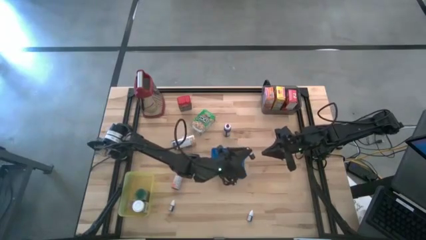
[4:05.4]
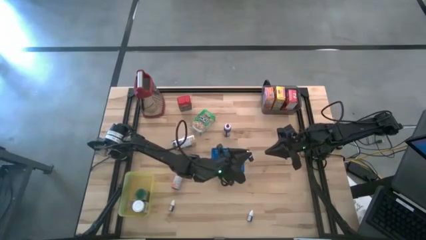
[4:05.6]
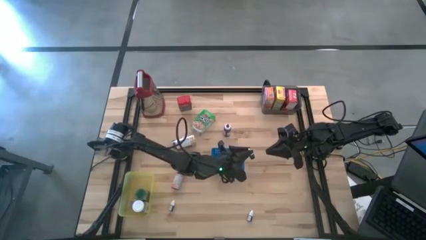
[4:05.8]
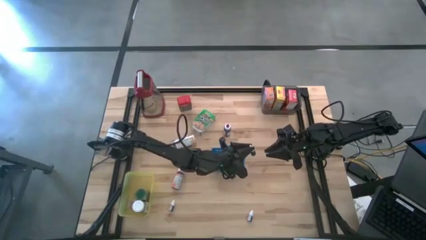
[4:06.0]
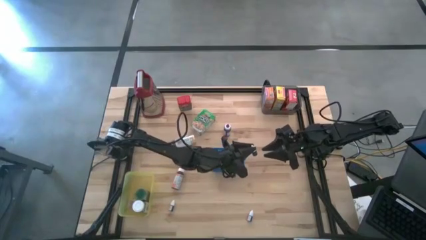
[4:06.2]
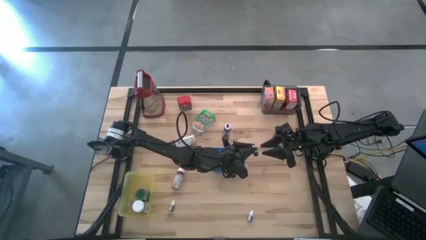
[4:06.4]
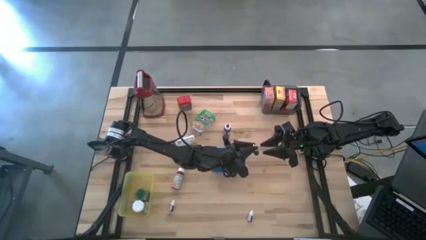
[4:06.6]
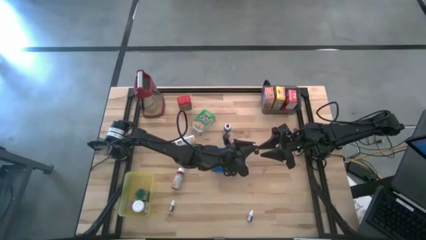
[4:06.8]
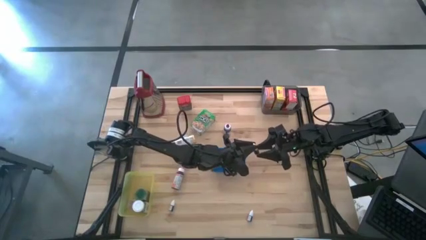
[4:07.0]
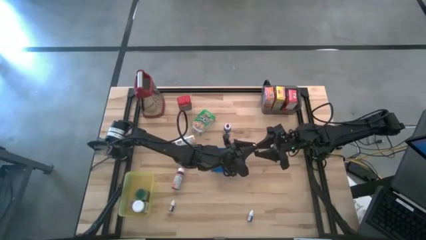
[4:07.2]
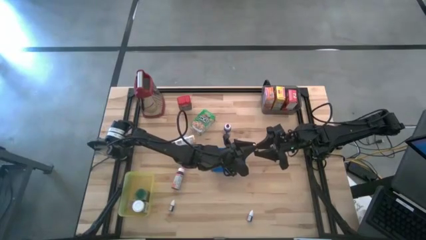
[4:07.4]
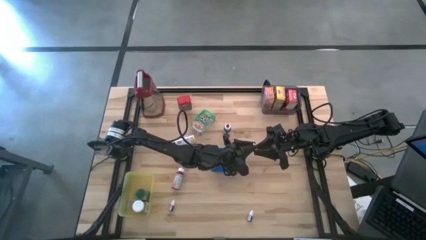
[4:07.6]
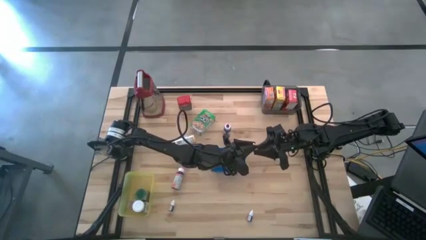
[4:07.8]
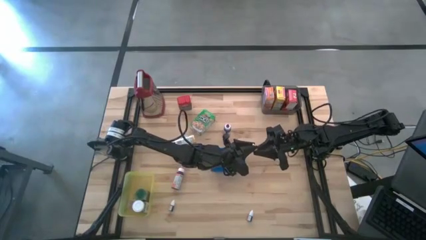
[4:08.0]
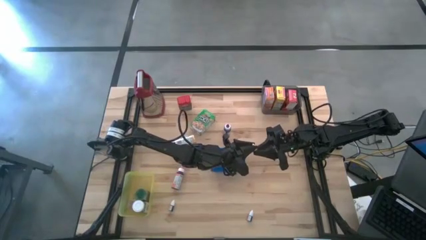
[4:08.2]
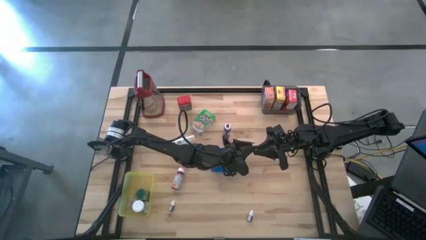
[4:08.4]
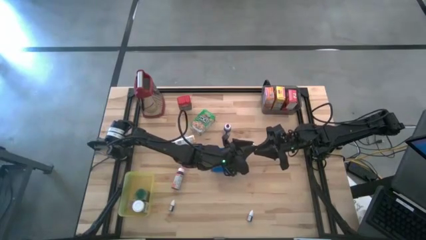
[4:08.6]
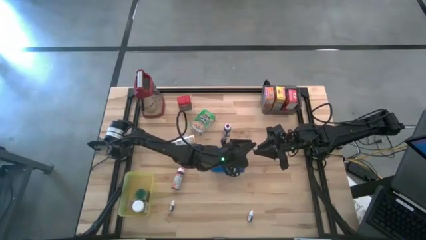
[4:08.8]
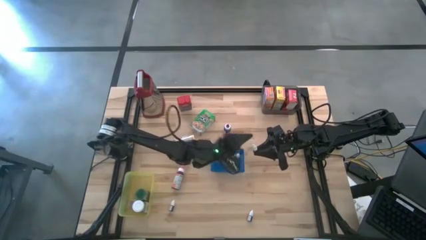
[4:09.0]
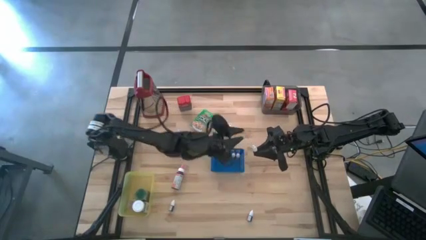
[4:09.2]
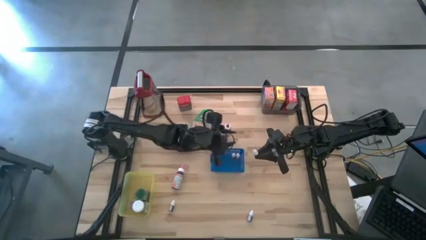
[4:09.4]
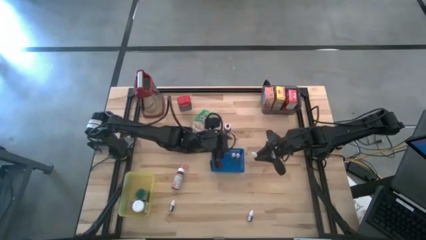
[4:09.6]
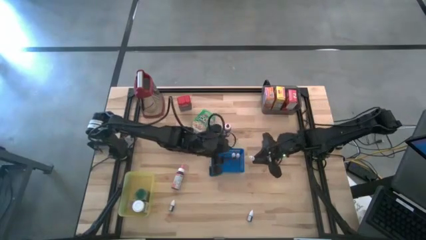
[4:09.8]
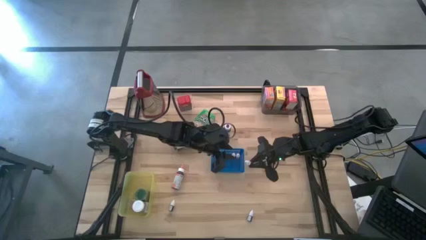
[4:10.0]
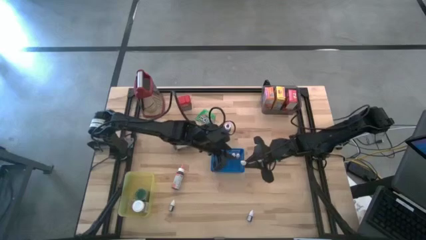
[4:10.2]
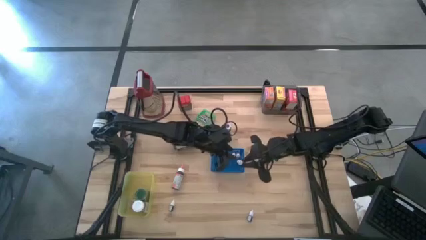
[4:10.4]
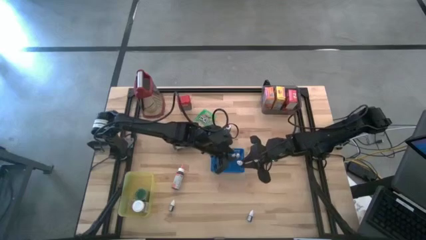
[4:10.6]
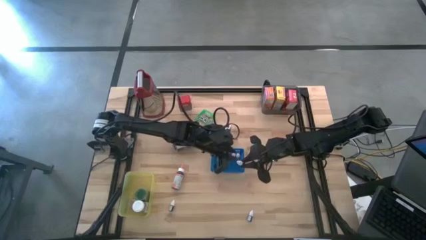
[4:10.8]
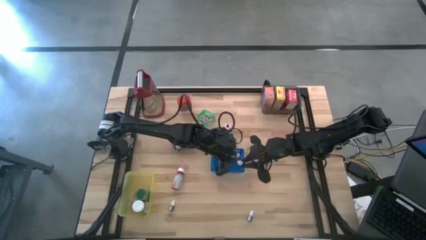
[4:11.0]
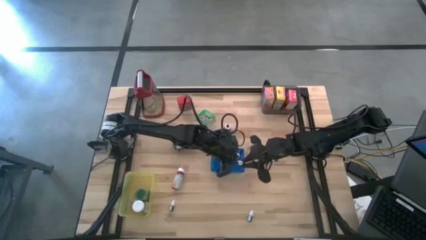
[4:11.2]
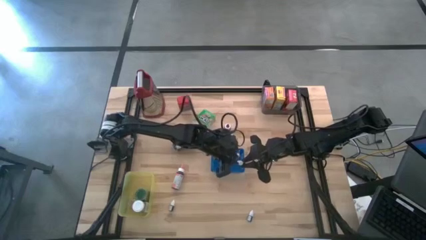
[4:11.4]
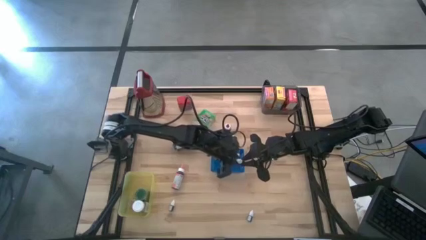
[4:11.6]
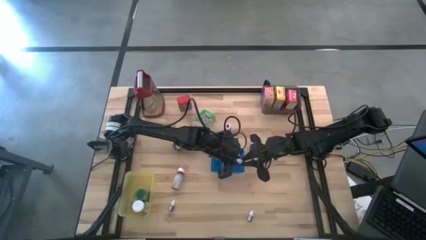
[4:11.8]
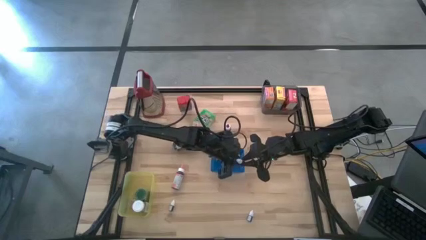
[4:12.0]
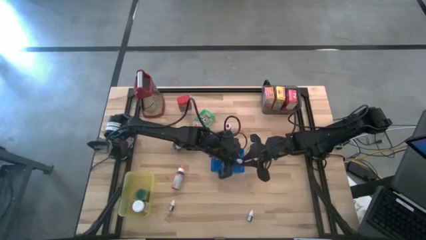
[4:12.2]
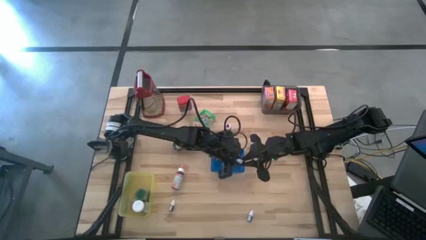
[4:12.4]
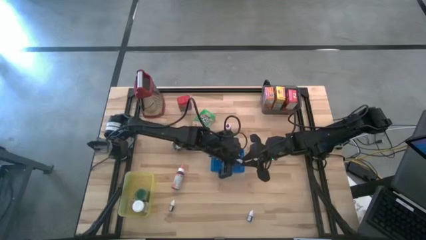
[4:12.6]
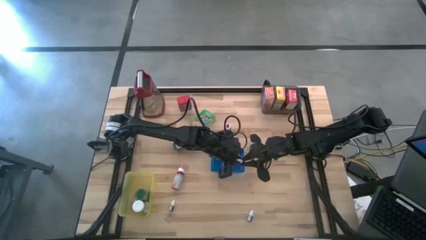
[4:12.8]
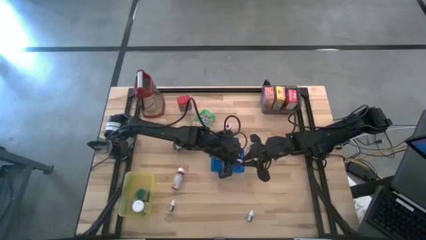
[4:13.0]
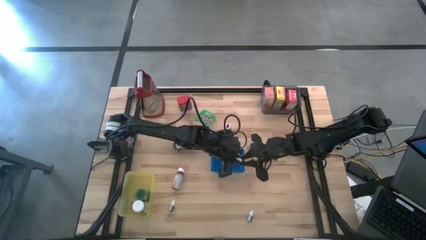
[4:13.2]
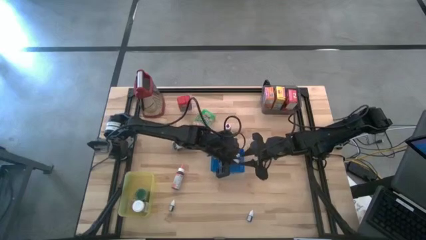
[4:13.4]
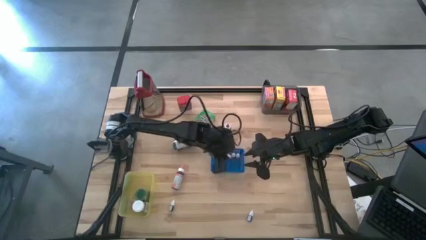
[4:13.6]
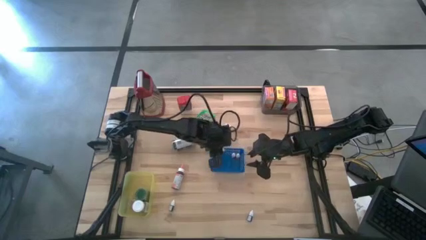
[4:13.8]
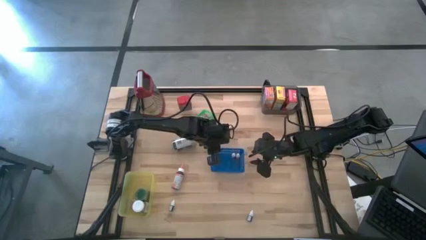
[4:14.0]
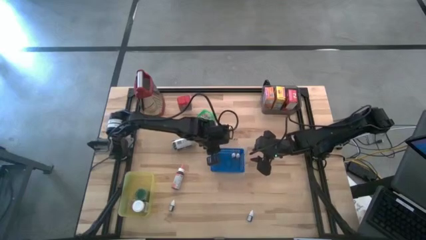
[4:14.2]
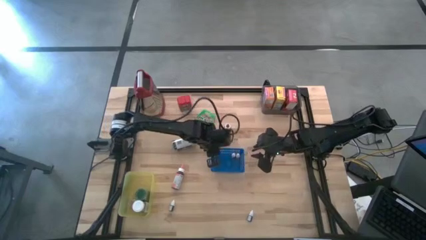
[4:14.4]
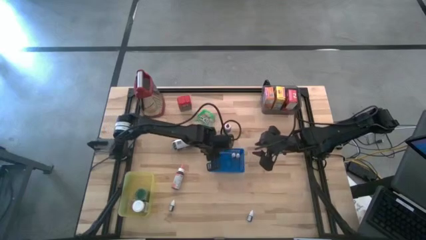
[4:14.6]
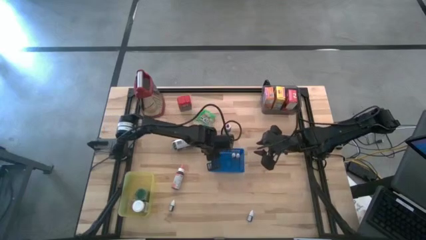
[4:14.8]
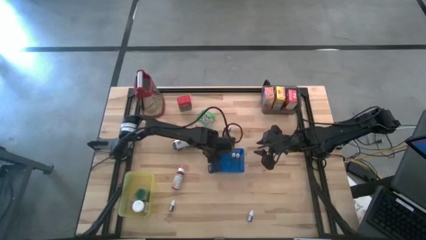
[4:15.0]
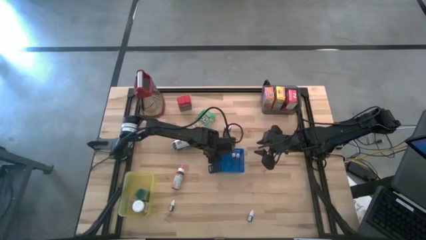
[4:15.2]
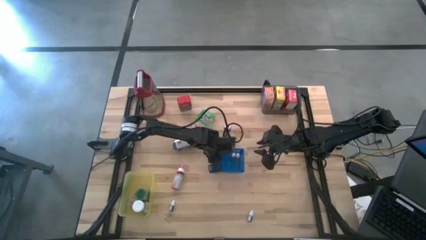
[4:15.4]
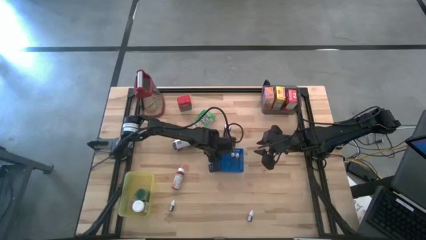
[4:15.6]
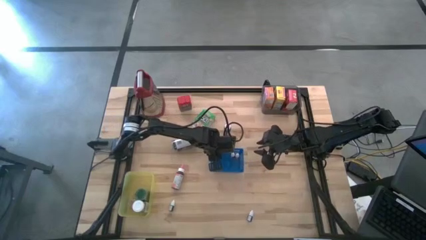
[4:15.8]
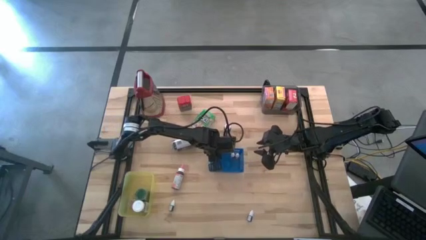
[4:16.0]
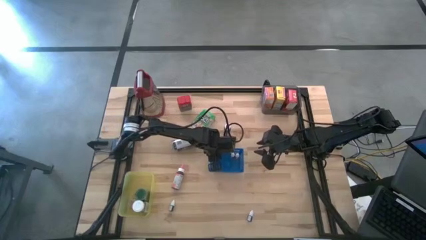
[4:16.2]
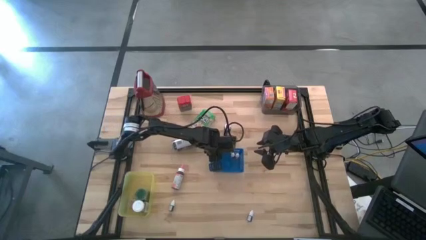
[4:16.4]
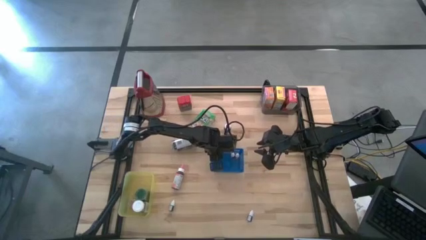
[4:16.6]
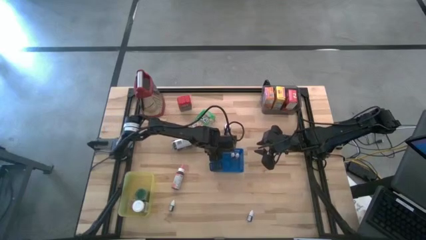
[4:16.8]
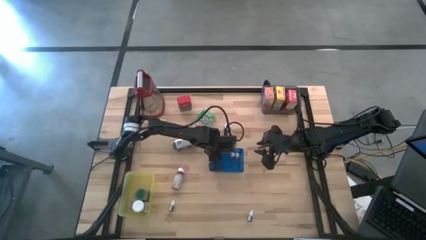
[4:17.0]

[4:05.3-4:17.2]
Task: Pick & Place Kitchen Items
Put the small black food coloring into the blue bin
